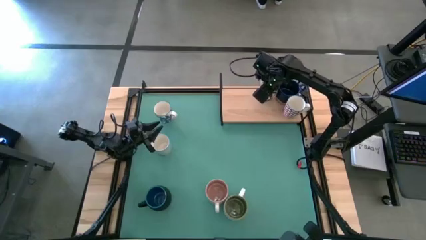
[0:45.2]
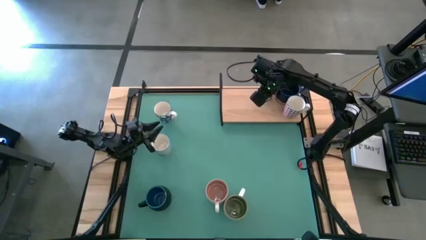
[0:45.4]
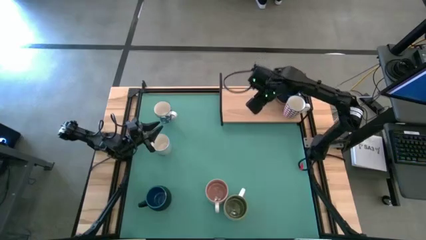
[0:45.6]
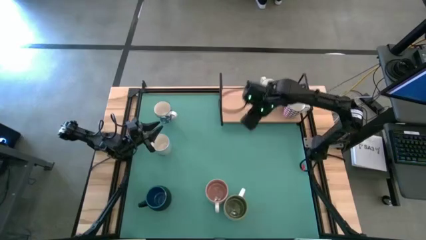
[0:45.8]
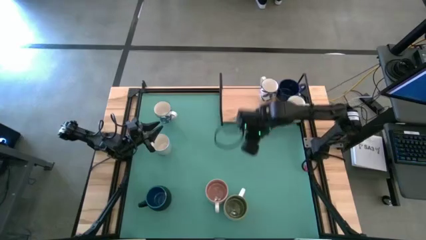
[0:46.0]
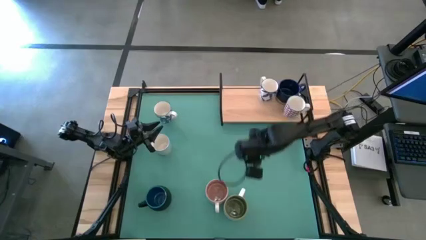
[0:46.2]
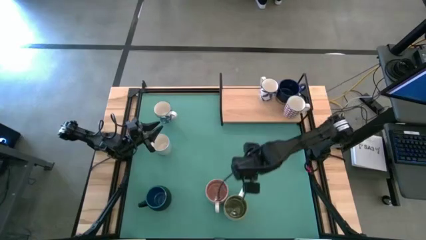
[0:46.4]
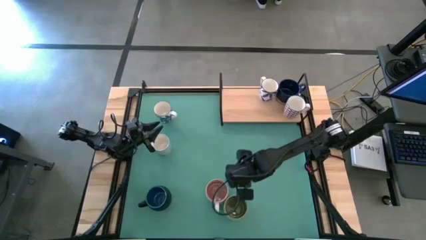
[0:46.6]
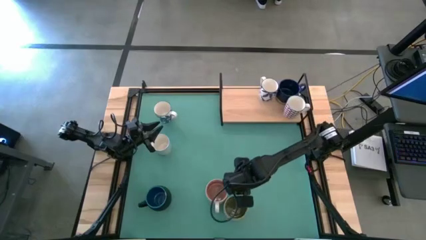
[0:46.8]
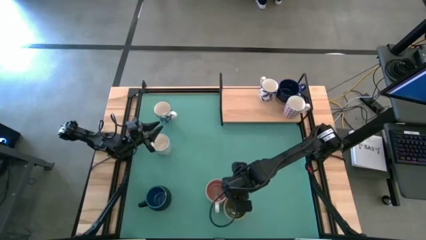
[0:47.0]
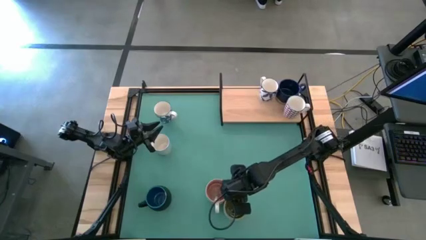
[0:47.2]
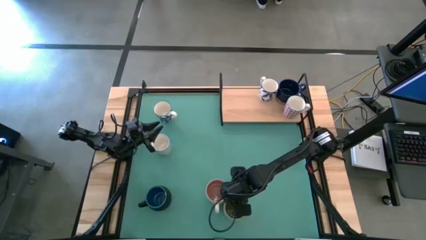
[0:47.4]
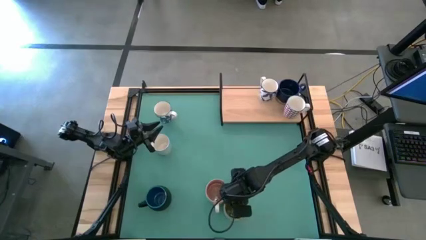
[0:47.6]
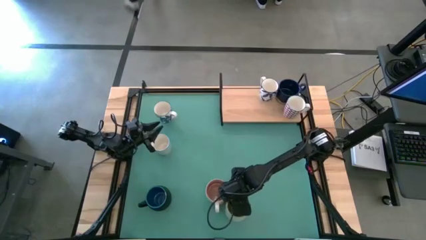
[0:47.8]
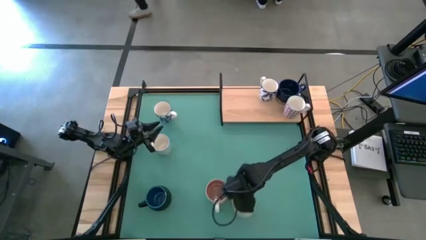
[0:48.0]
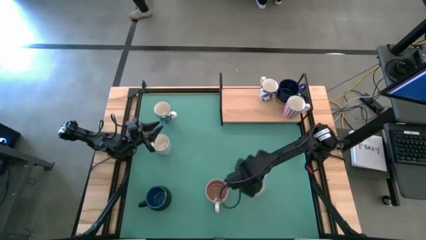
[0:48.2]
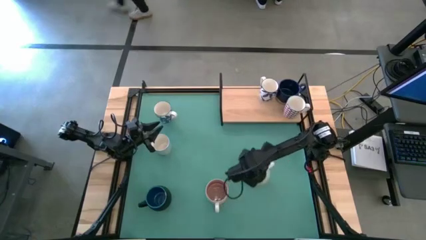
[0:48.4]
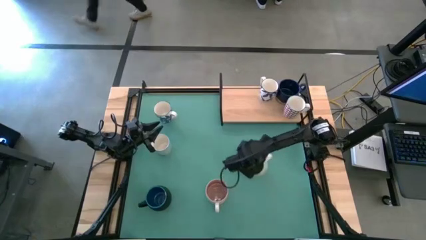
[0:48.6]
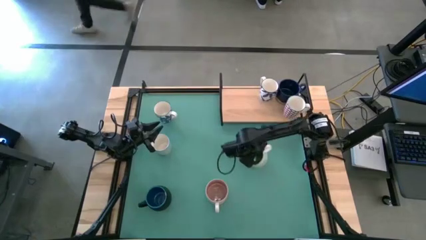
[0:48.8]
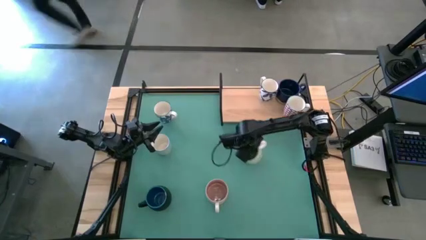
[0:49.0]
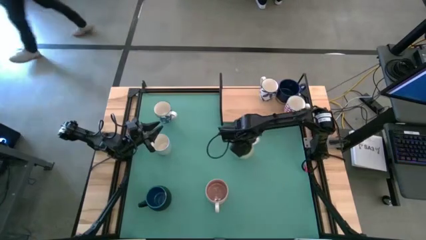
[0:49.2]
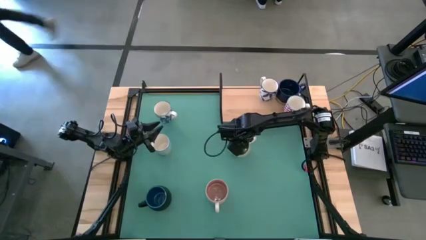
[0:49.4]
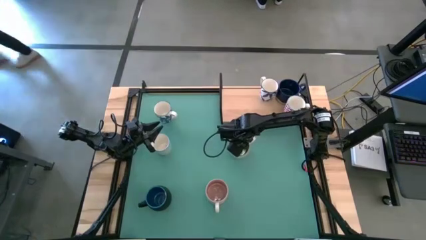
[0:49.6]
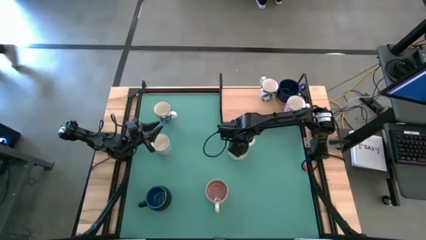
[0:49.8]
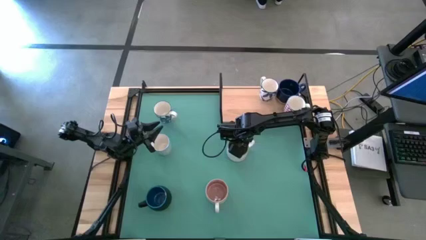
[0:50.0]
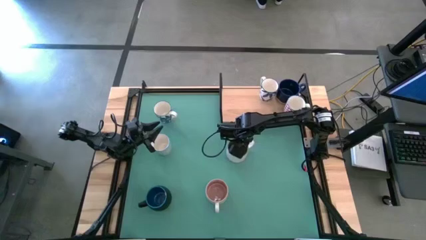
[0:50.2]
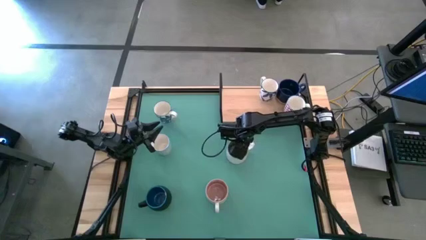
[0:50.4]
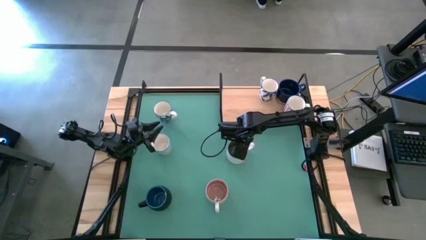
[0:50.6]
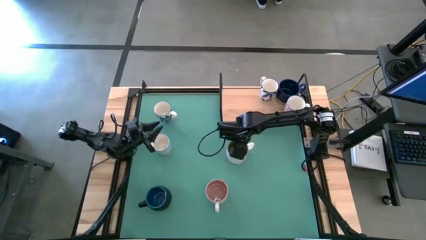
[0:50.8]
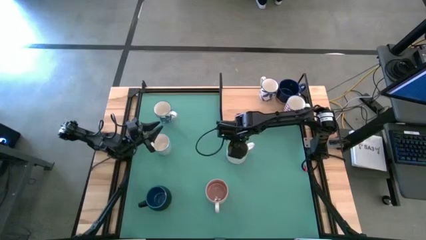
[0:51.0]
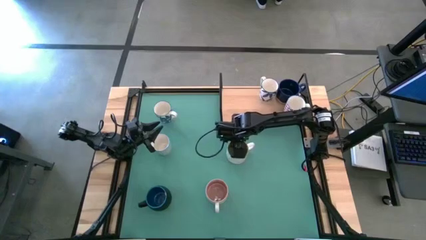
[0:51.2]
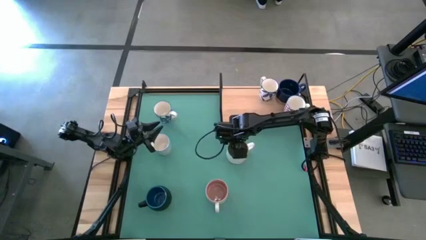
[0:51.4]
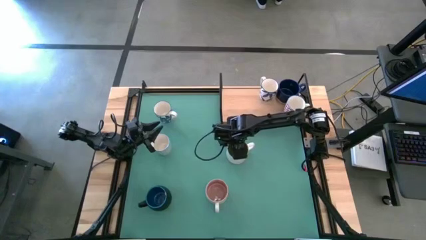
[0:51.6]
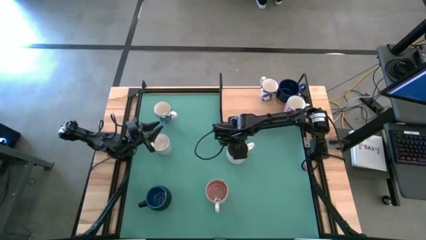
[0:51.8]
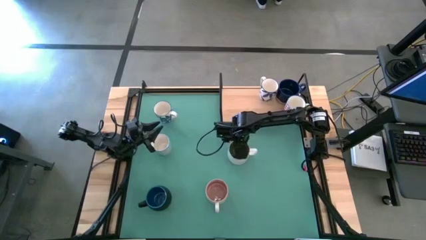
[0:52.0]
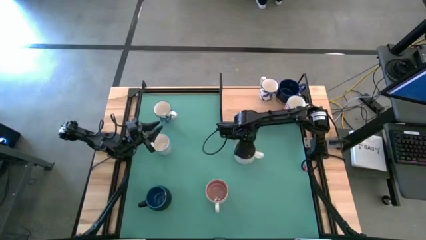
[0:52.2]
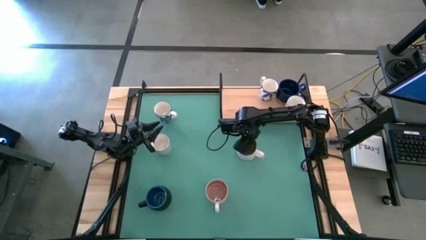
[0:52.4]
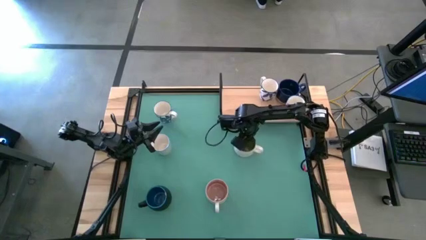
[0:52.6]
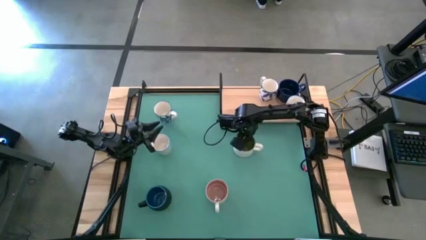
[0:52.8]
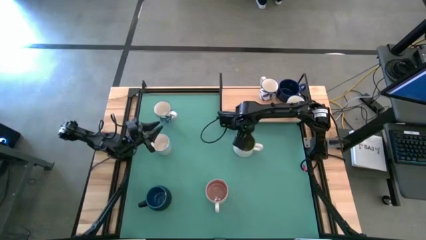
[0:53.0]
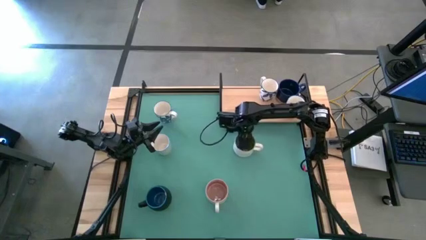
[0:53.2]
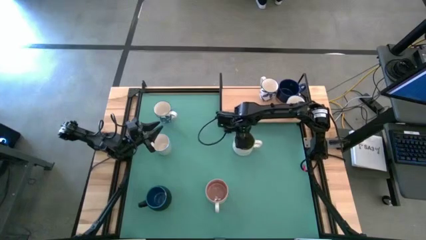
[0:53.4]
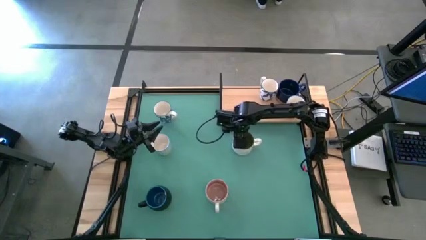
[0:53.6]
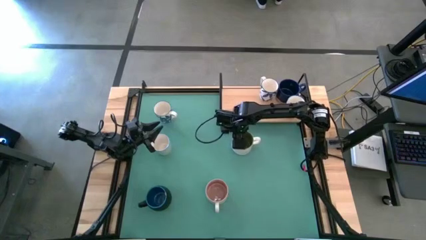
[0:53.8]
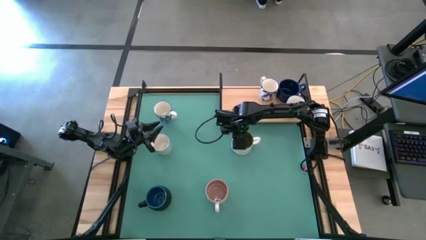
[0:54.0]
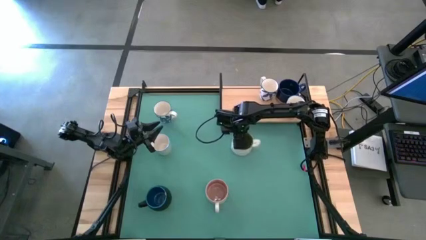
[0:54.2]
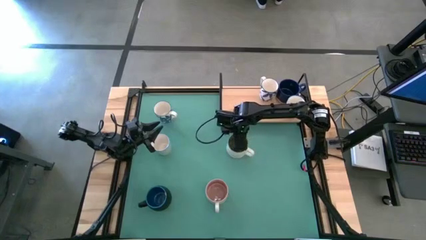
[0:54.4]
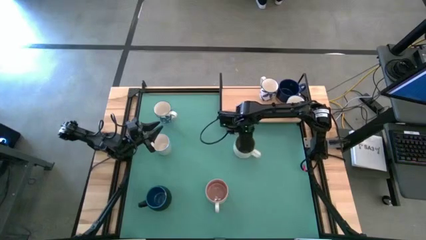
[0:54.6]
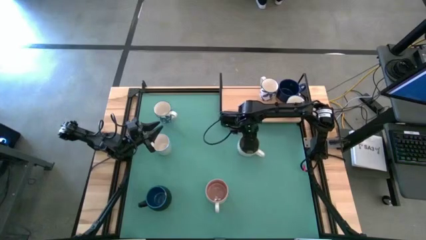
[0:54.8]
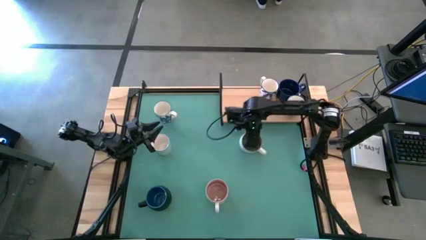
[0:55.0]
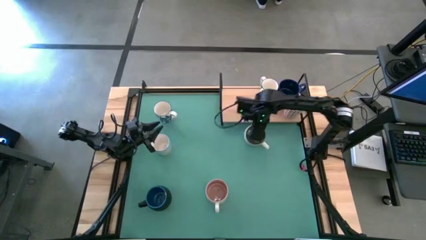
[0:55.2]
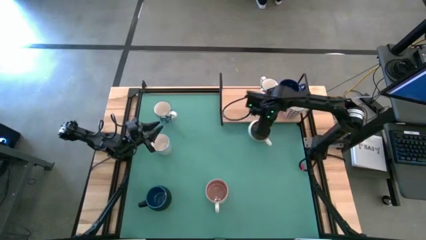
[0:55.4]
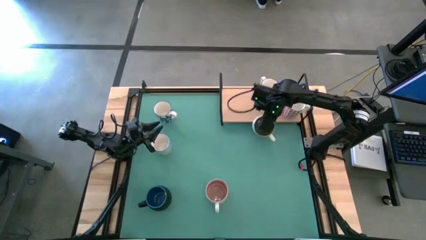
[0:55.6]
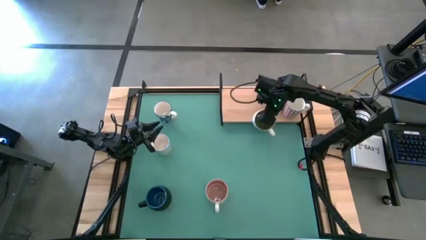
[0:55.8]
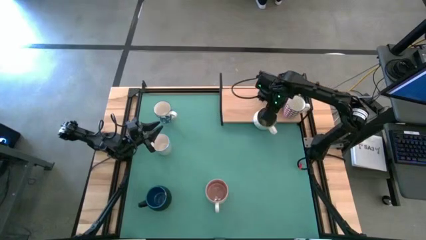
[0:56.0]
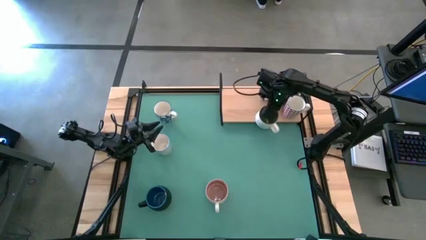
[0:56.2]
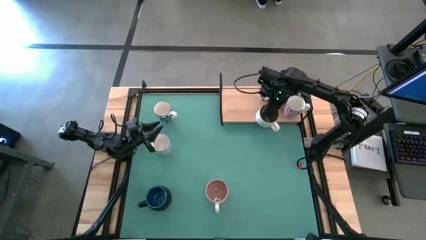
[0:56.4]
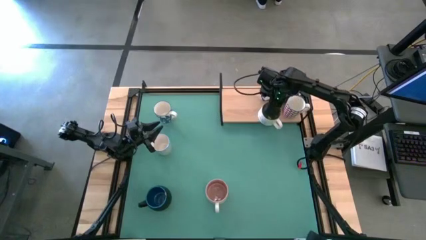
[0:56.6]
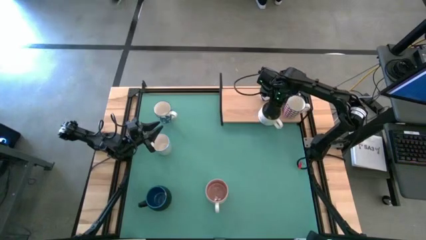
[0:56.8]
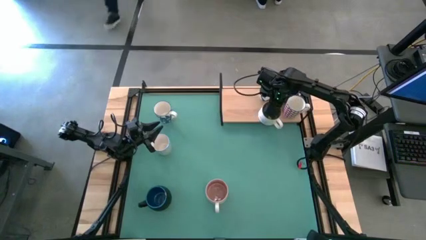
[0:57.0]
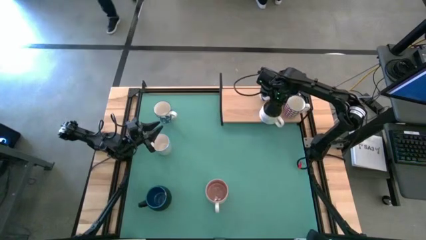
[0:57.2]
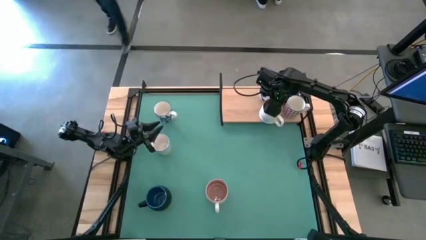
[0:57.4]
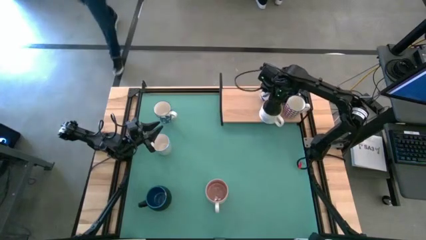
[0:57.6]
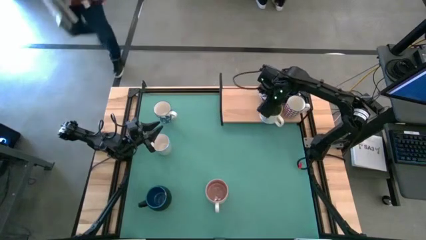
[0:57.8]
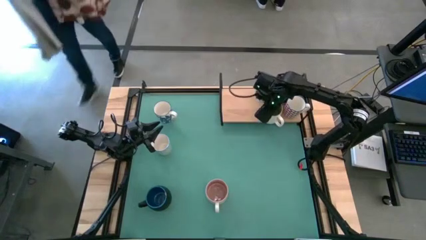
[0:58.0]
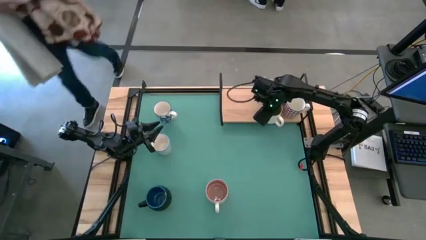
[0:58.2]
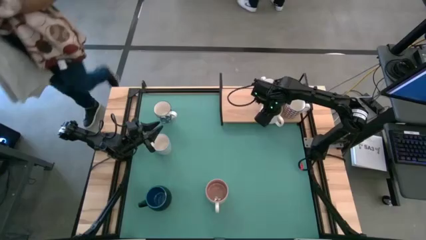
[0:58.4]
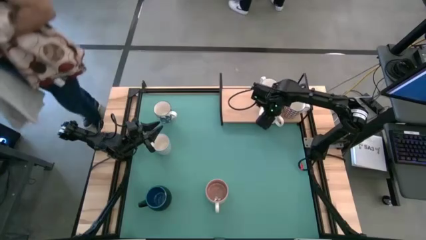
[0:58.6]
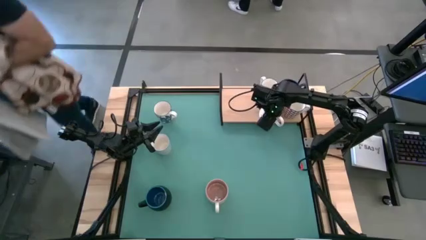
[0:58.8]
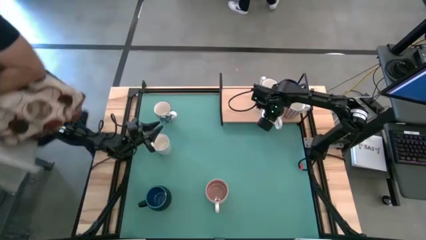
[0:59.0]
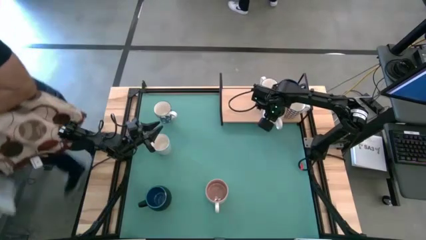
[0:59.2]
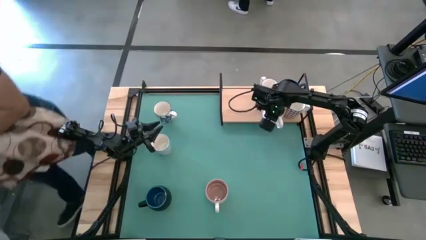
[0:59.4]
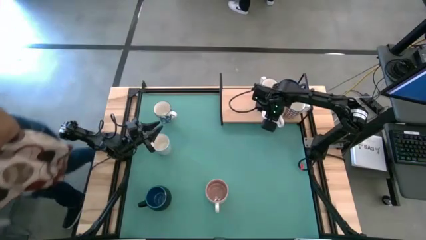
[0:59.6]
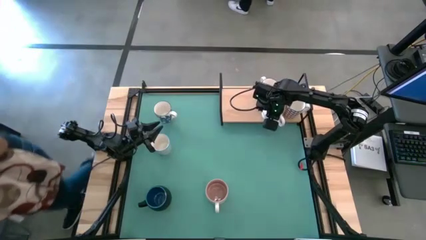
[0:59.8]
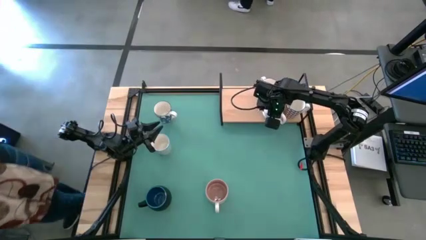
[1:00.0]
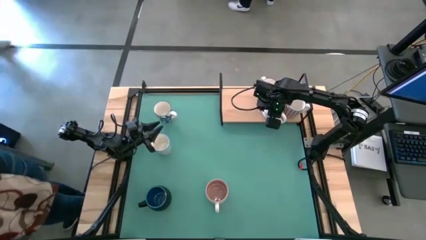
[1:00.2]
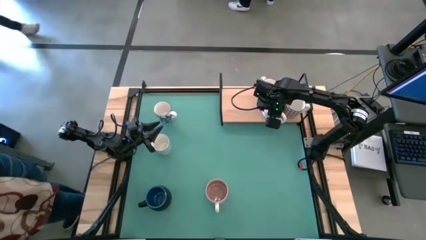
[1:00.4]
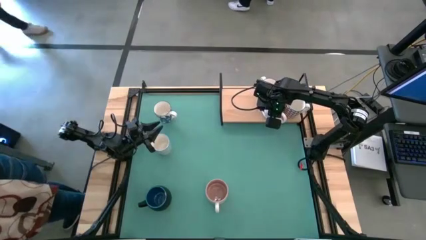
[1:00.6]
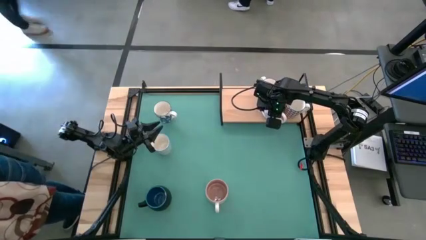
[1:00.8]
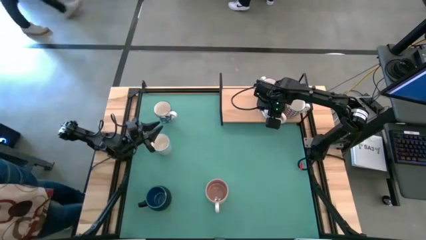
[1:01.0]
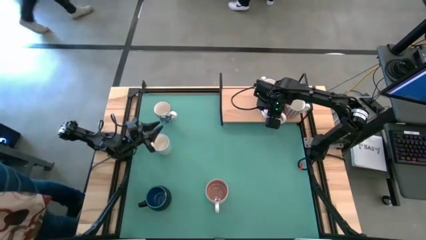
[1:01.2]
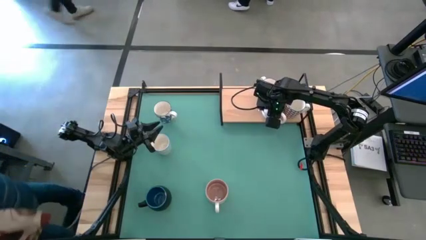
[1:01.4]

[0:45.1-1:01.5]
Task: Place coffee mugs
Put the green white mug on the shelf
